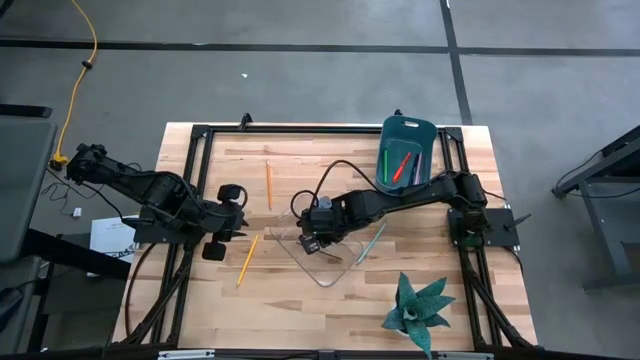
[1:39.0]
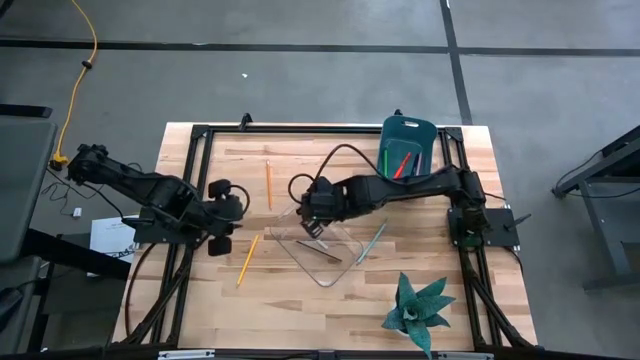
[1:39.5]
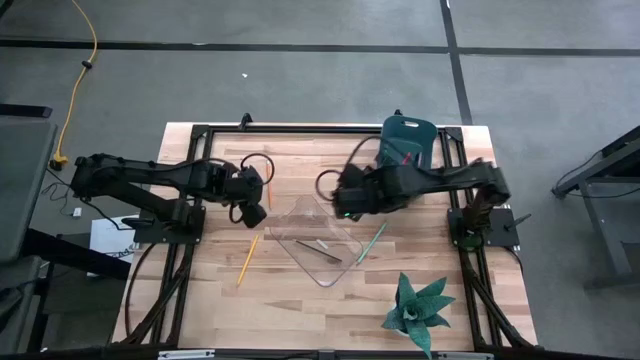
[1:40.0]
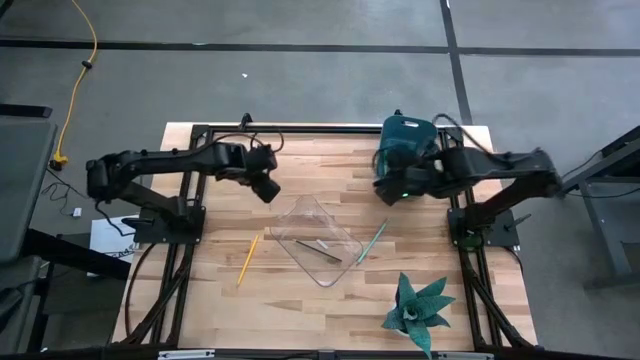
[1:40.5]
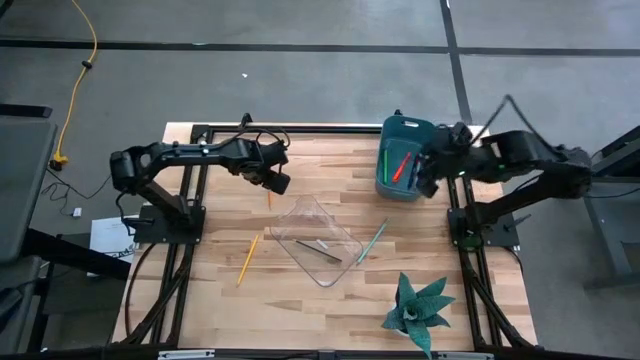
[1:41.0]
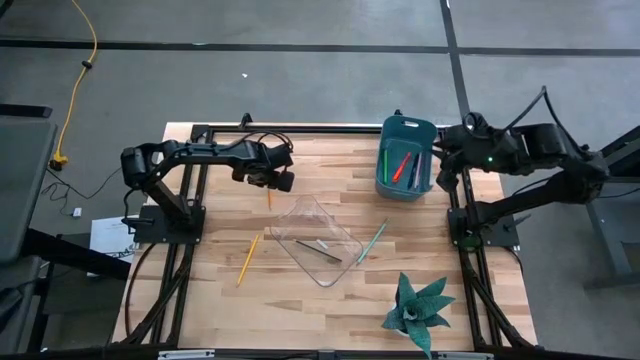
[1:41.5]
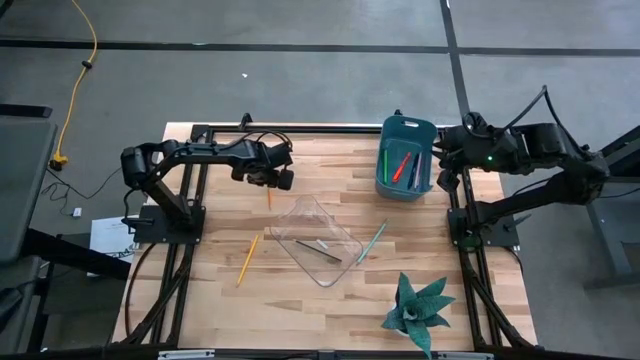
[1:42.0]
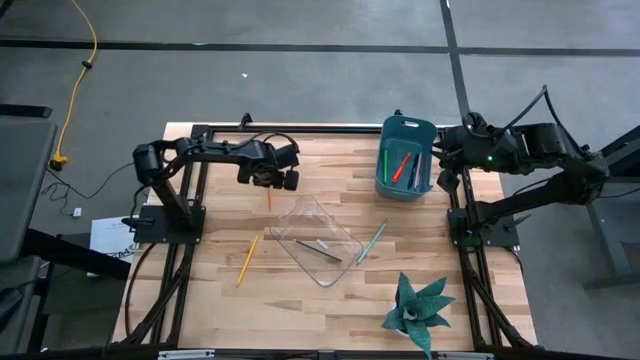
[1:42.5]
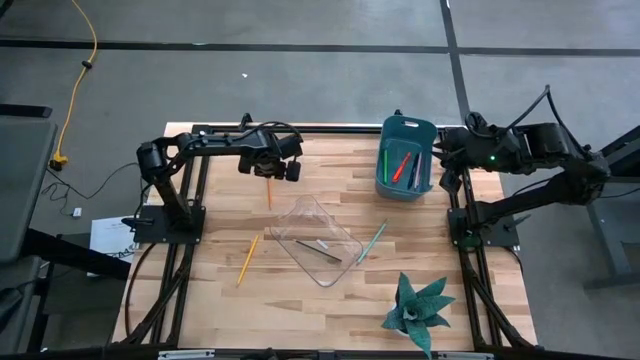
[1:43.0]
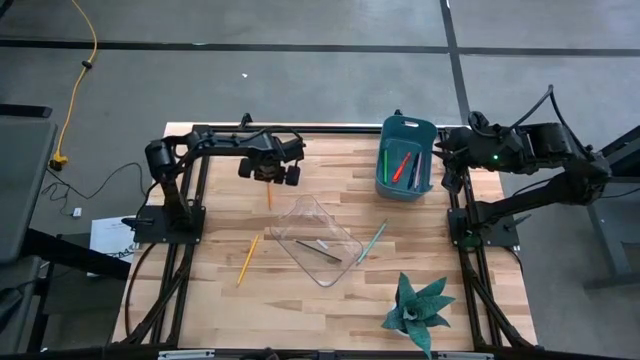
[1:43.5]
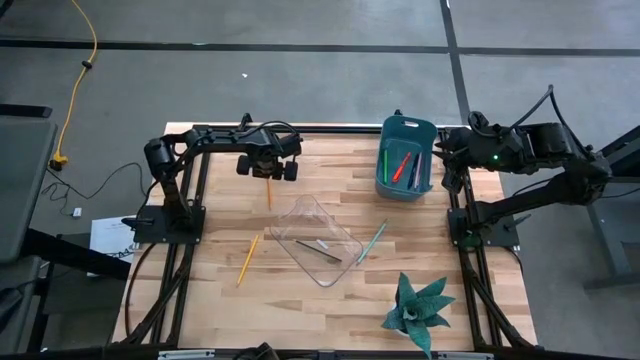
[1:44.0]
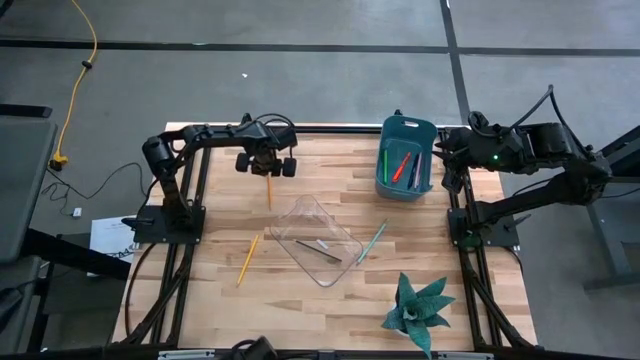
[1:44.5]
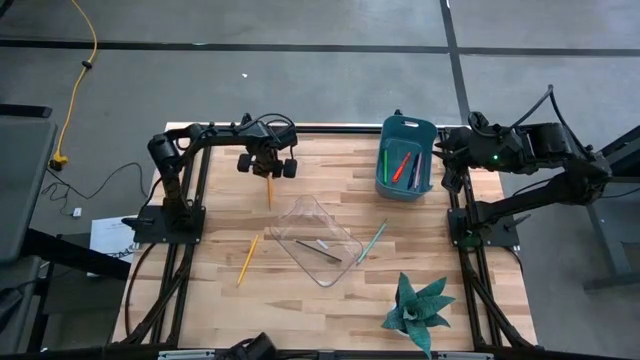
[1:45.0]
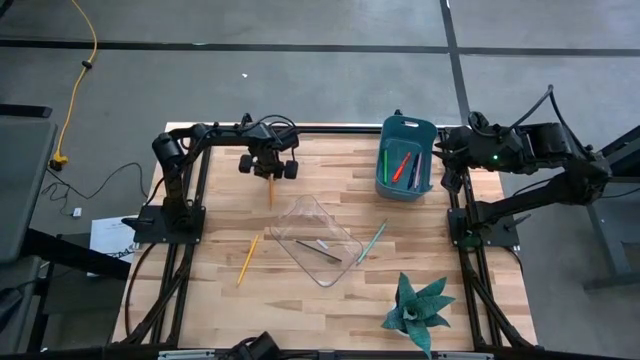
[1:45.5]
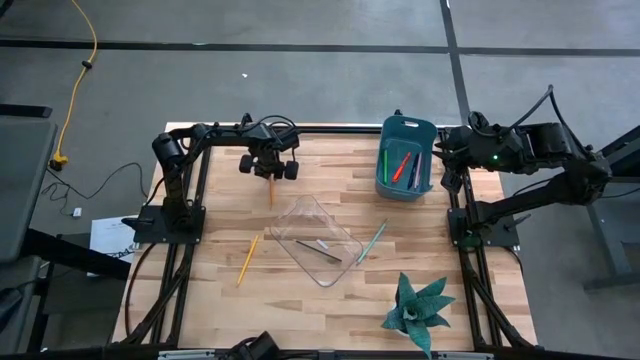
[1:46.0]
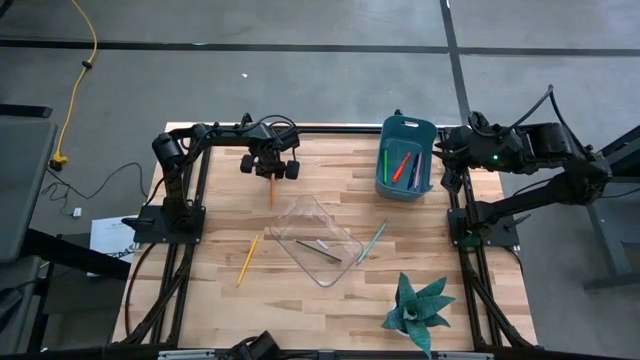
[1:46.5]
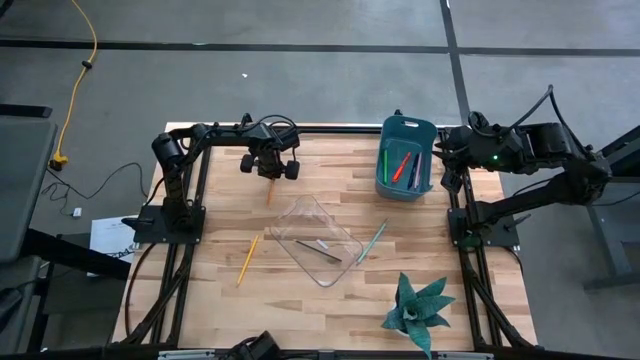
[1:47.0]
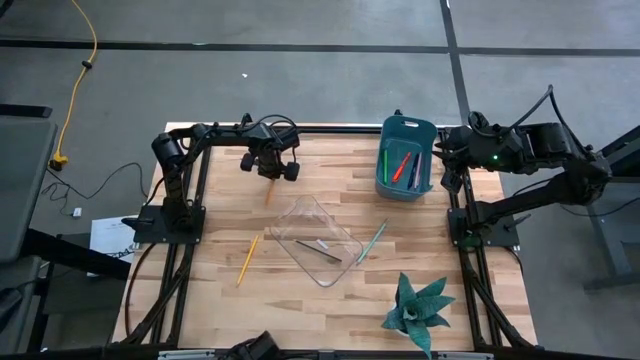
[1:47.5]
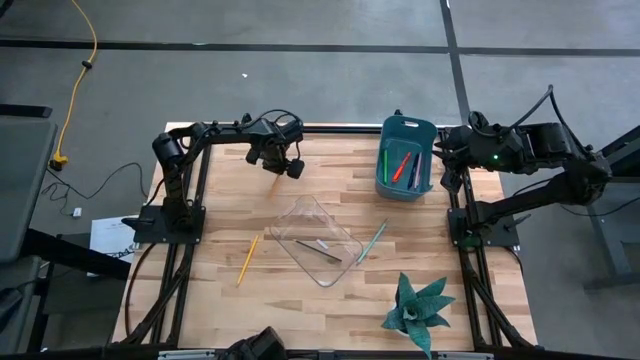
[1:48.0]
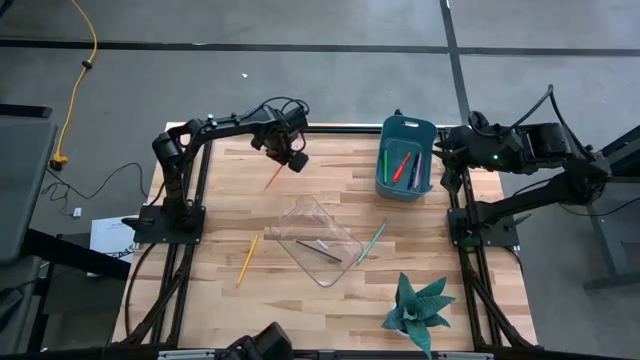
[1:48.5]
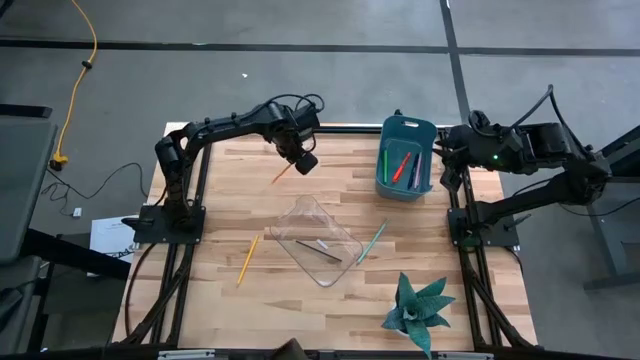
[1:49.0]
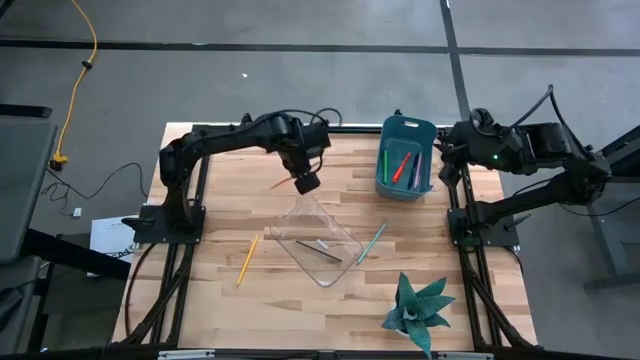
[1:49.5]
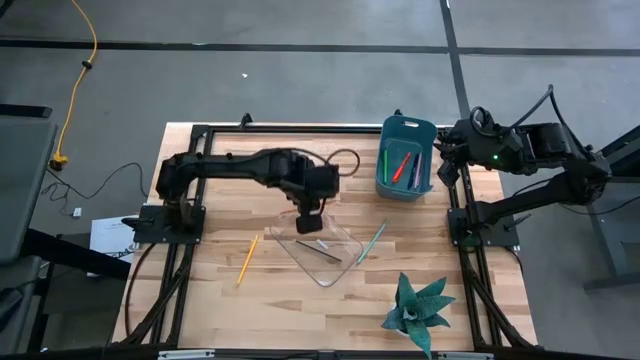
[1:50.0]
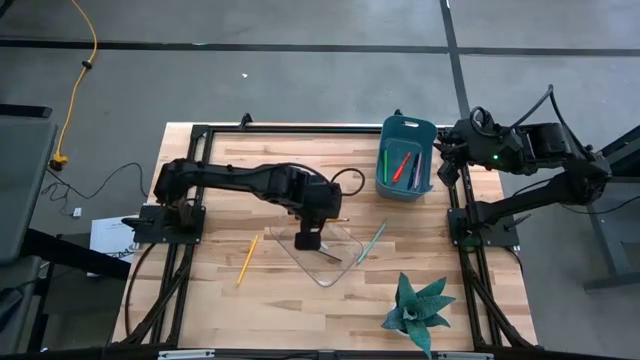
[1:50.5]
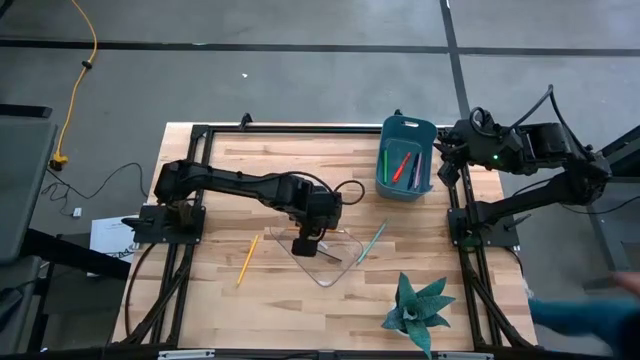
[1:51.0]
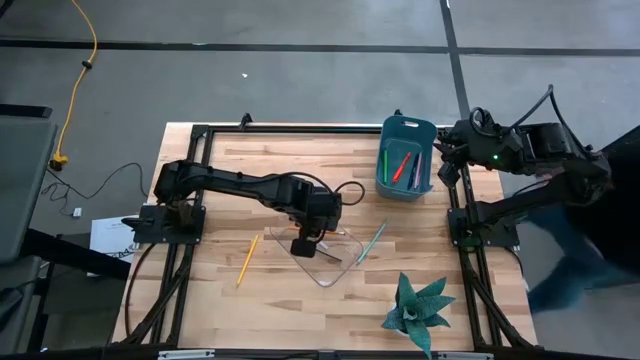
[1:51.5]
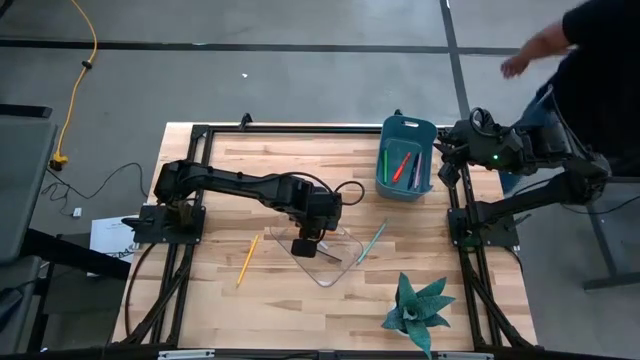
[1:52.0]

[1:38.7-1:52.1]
Task: Sort pens & pencils
Put the orange pencil into the transparent bin

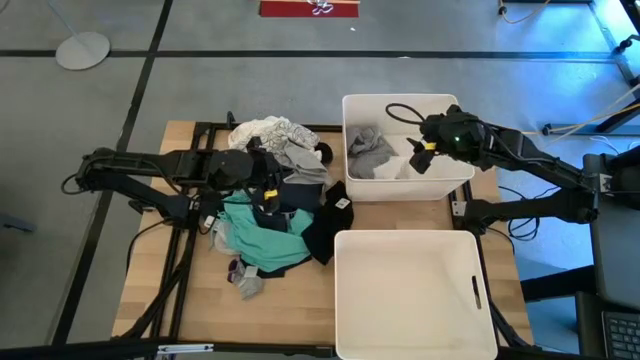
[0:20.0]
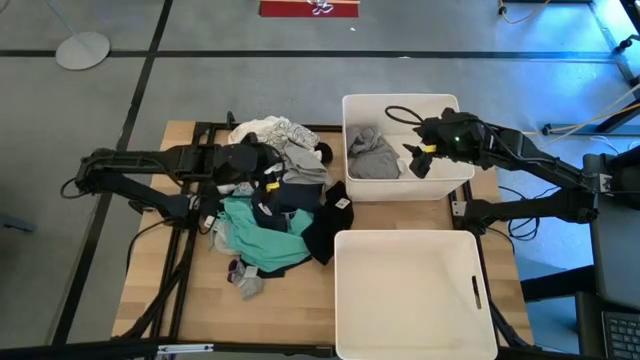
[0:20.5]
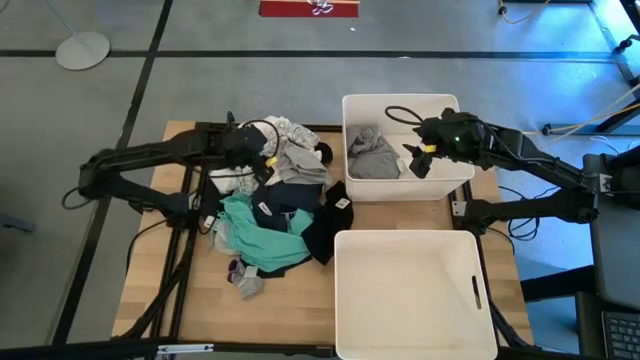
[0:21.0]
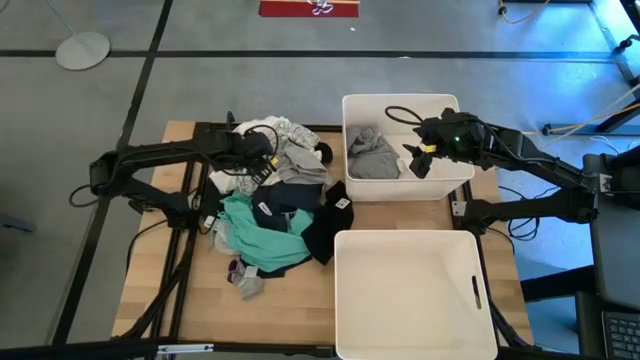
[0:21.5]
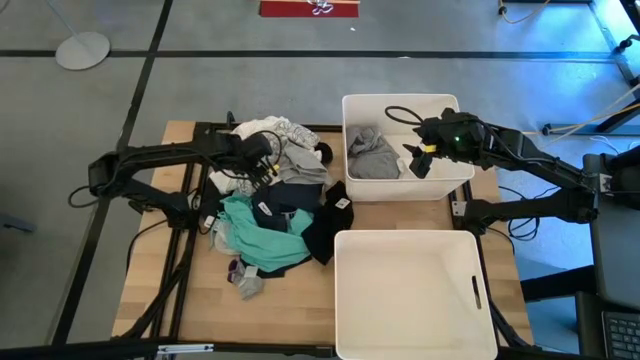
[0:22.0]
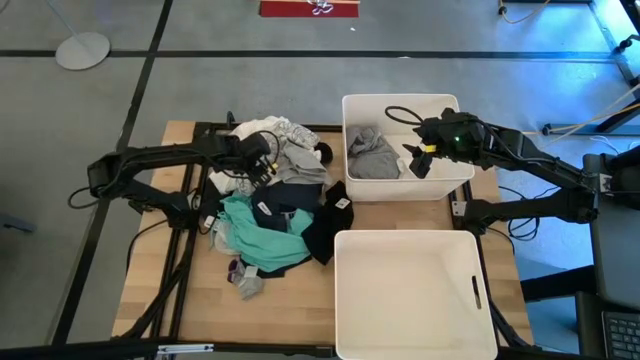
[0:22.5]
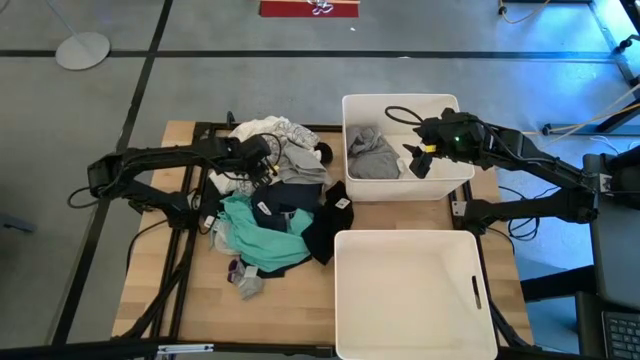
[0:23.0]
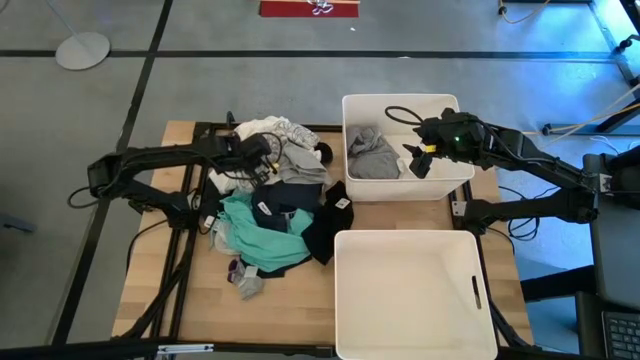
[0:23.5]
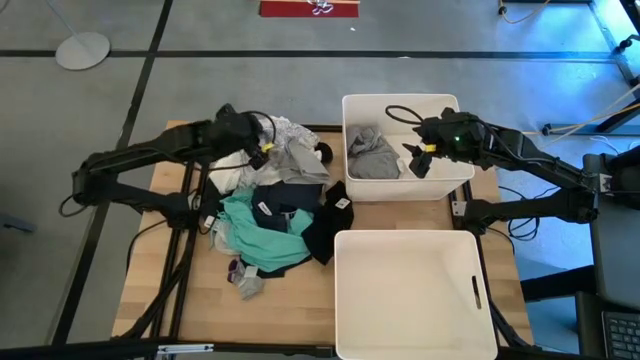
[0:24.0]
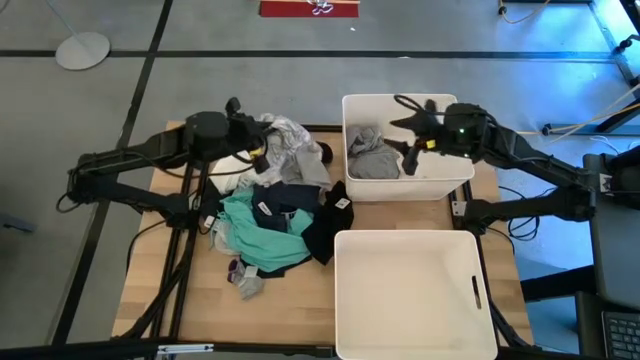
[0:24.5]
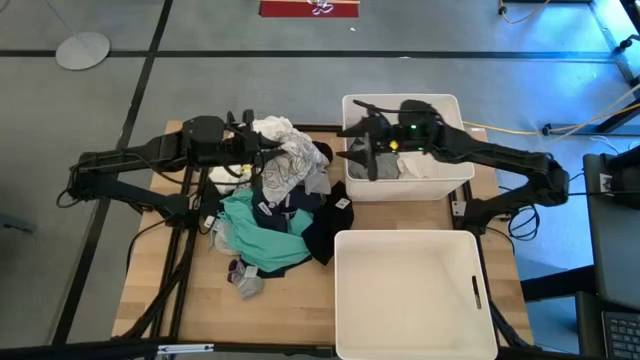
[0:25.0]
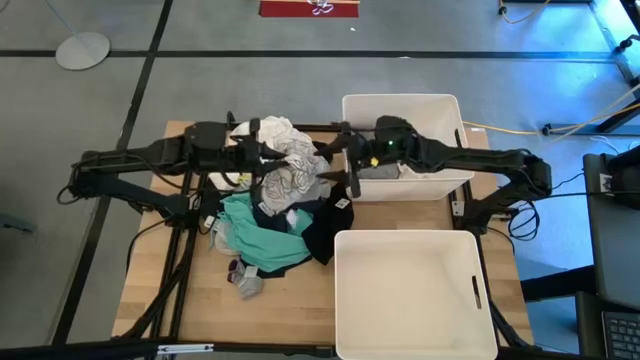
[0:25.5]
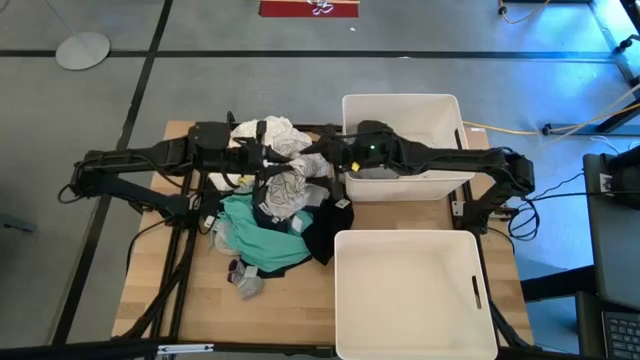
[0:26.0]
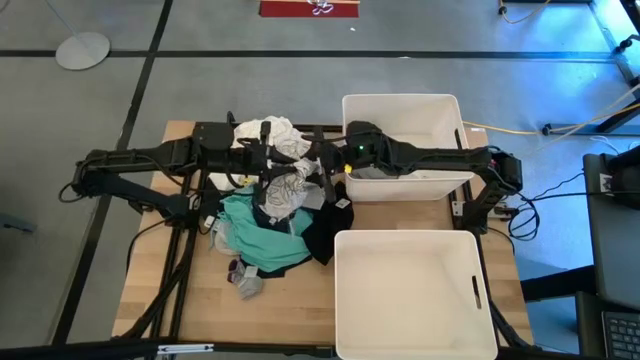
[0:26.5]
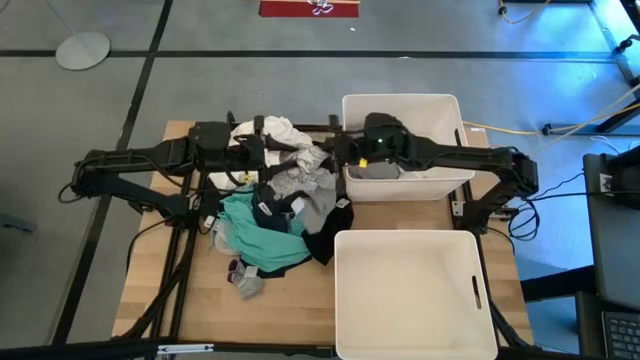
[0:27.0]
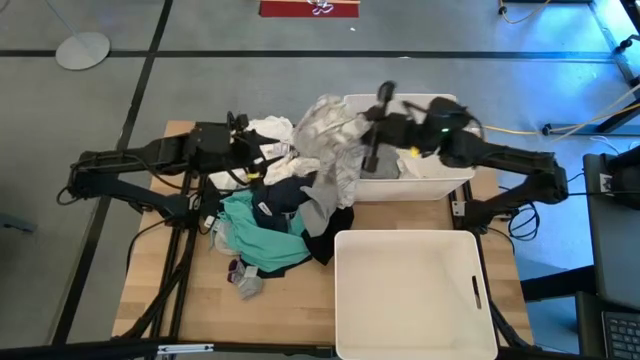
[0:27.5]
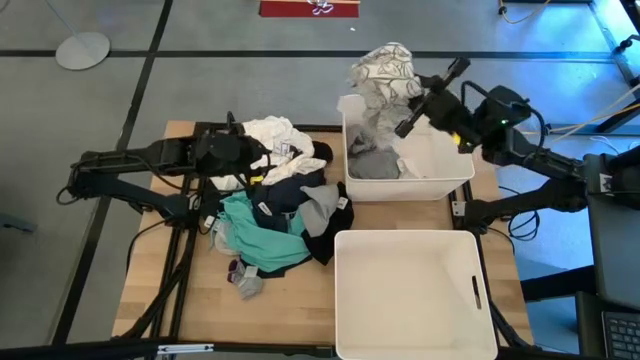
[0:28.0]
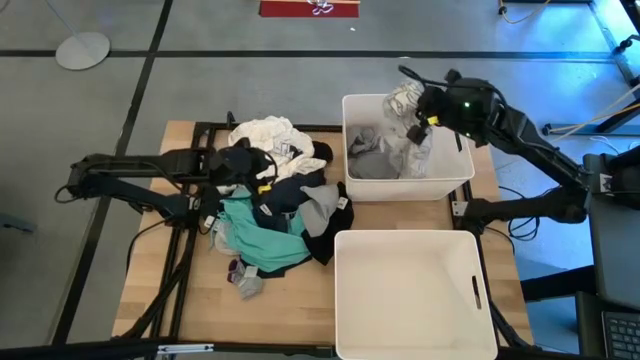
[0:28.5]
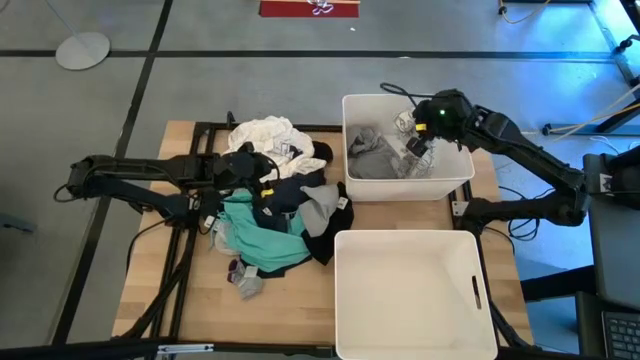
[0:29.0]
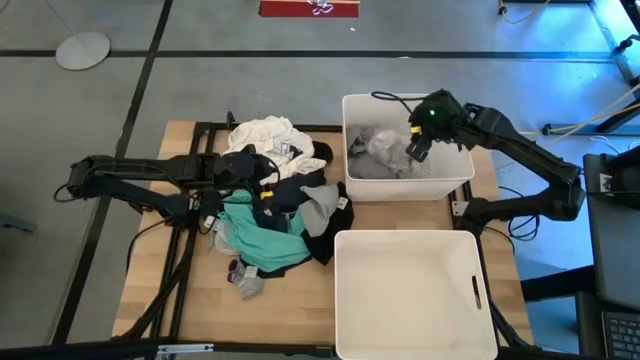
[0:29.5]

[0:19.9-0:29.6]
Task: Sort clothes
Put the white patterned dress into the top white laundry bin
